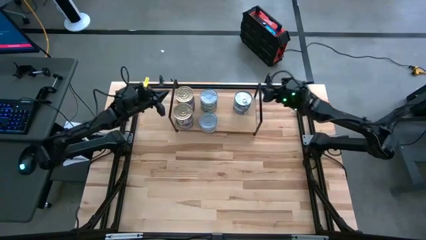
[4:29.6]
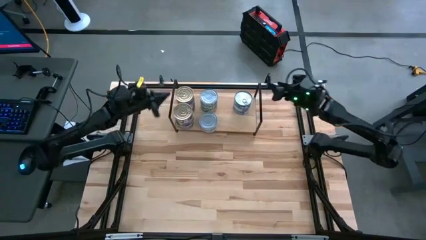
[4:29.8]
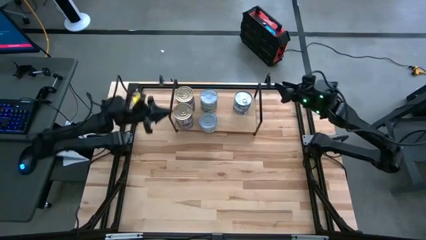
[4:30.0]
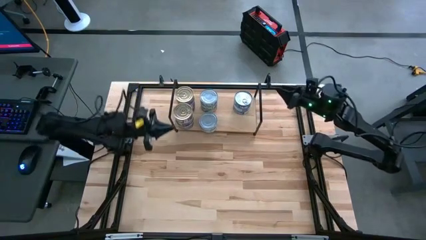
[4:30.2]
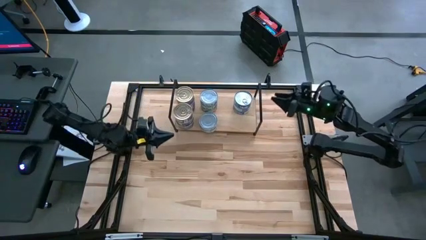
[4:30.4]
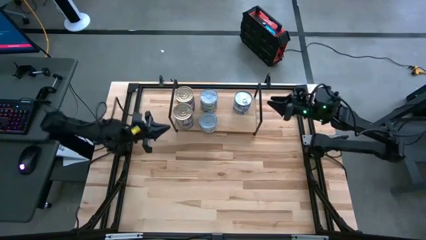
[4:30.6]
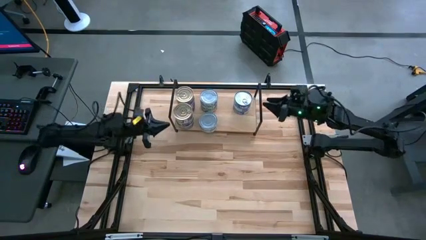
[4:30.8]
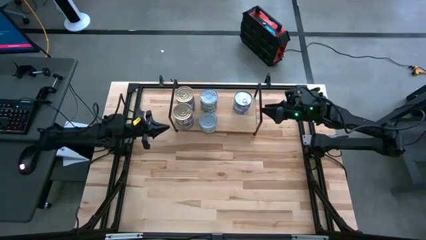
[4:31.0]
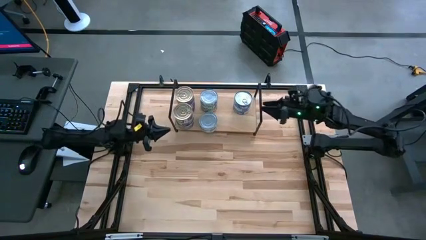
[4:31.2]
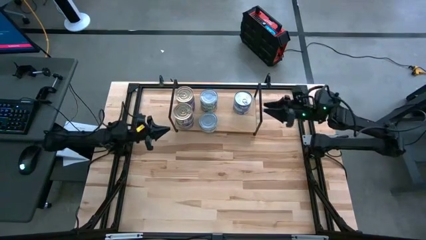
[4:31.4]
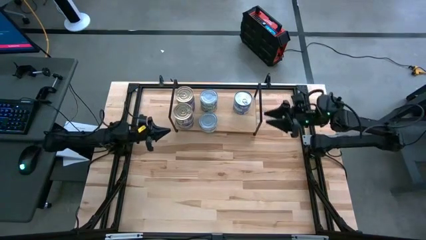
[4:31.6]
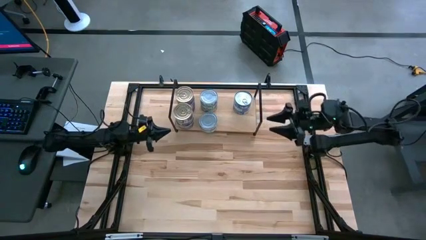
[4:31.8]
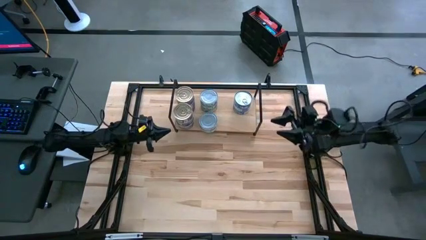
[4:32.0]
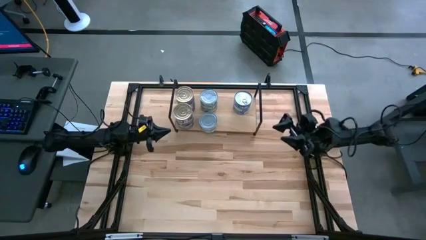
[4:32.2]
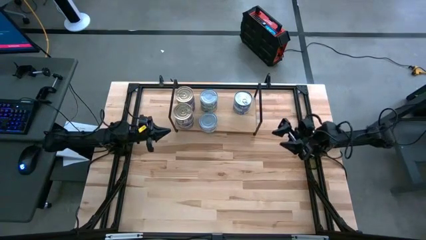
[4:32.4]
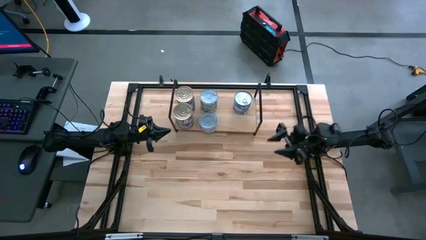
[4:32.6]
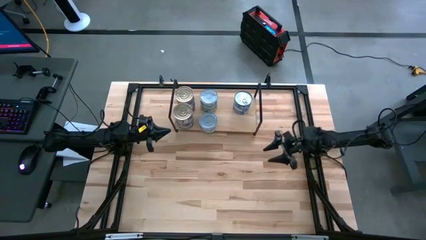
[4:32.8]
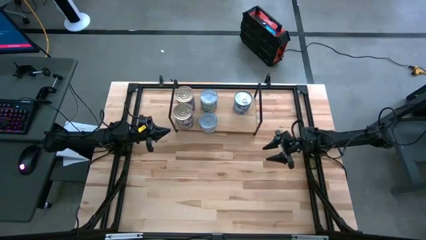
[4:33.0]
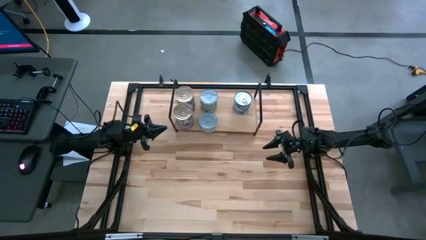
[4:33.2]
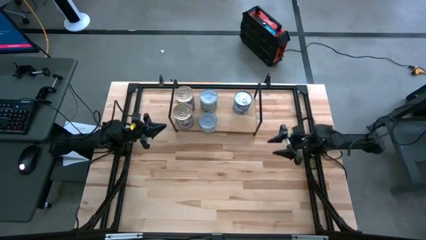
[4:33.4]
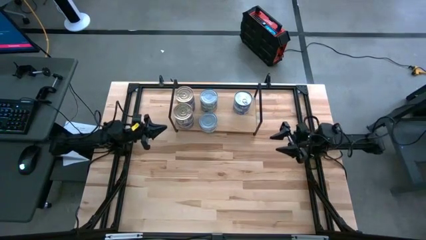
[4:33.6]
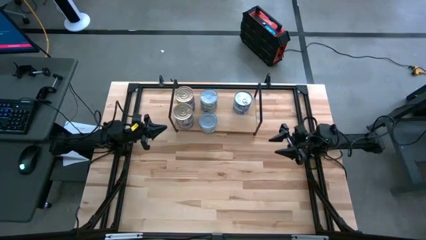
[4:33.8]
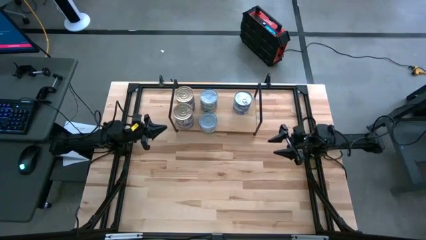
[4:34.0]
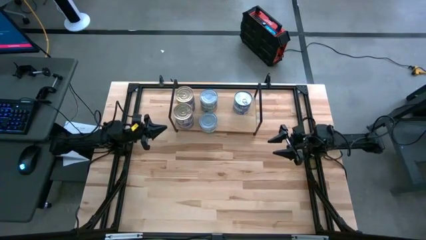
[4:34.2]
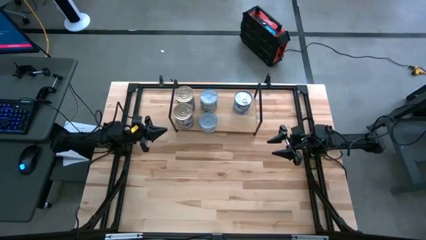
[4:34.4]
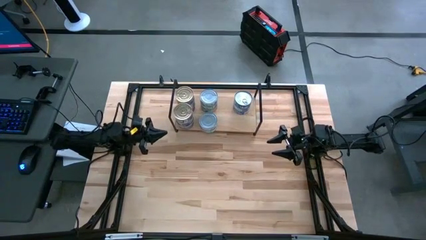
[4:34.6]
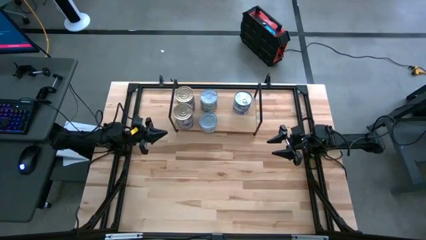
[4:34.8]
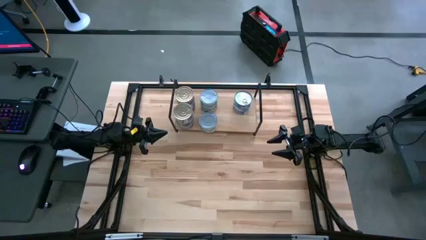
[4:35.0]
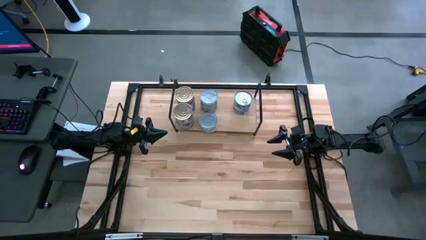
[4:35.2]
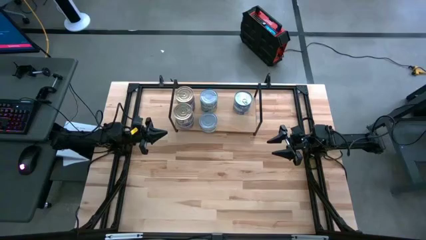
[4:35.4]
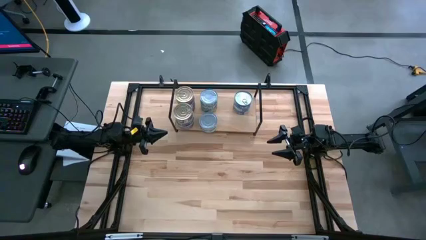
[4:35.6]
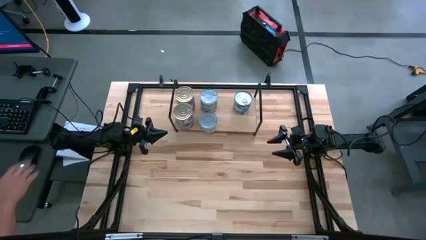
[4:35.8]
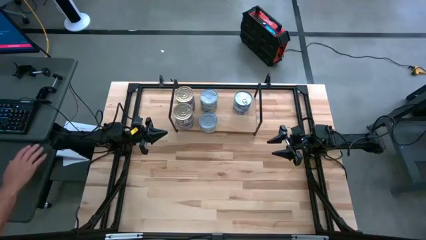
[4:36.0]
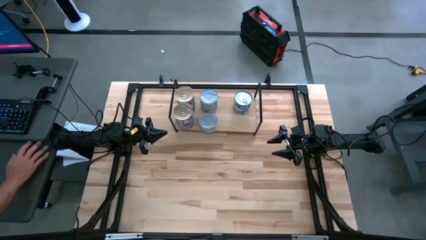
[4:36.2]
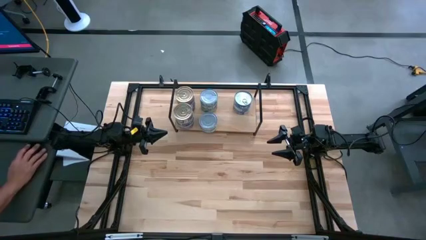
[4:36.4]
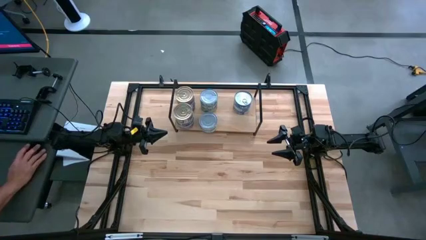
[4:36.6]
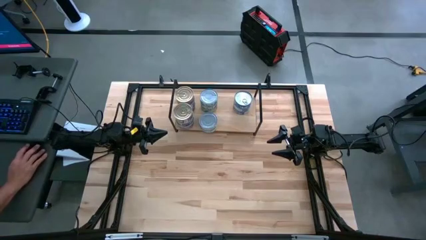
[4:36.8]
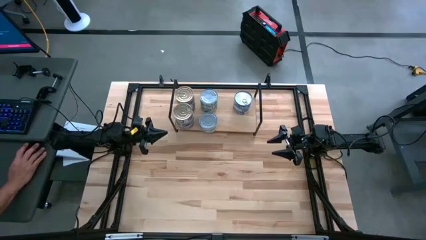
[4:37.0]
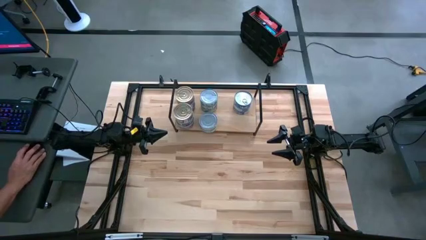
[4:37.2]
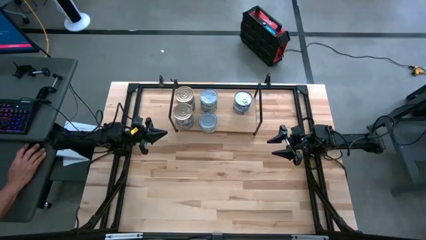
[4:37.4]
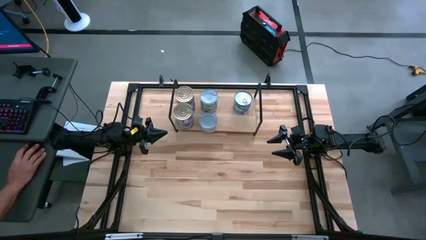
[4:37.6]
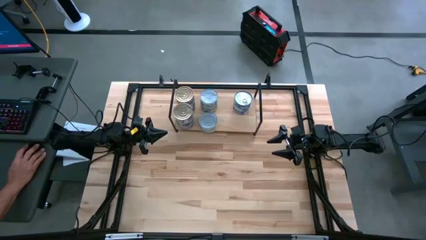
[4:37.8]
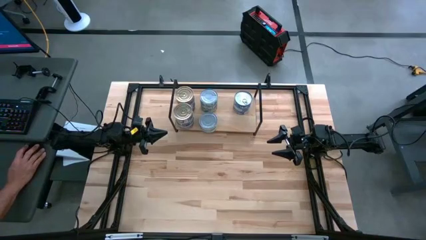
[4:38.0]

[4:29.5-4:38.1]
Task: Stack canned seafood by type on shelf
Return to Home Position

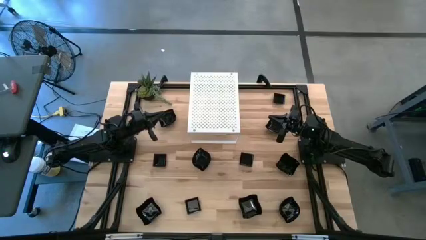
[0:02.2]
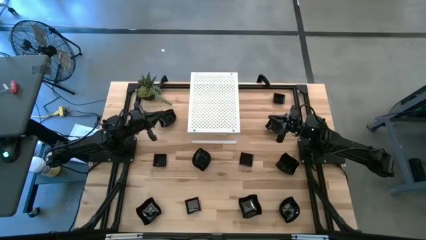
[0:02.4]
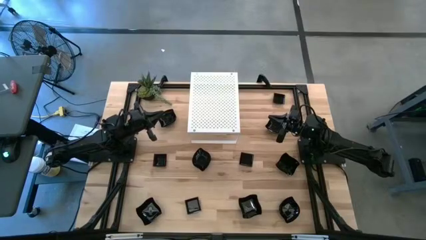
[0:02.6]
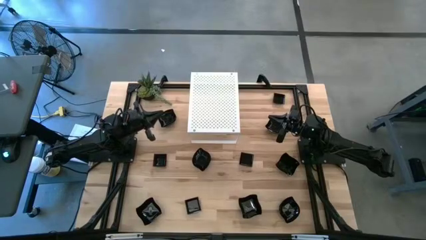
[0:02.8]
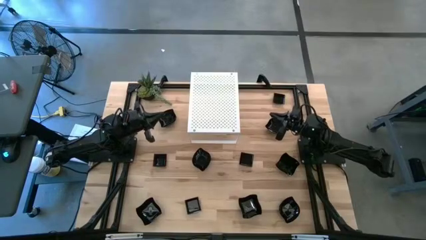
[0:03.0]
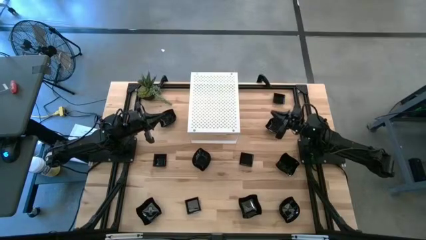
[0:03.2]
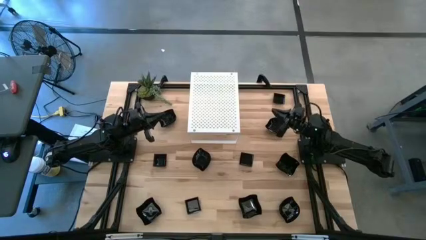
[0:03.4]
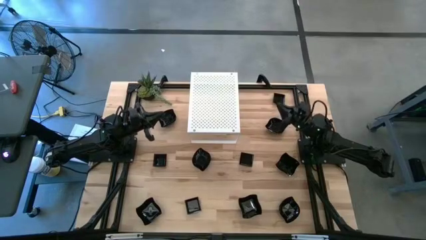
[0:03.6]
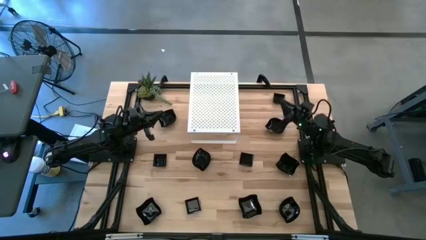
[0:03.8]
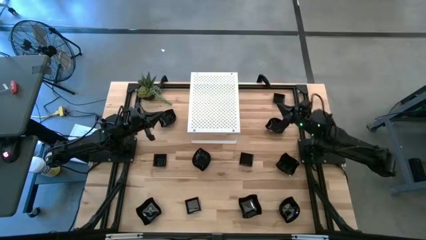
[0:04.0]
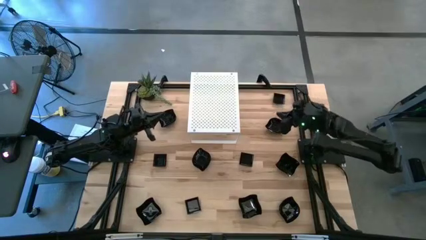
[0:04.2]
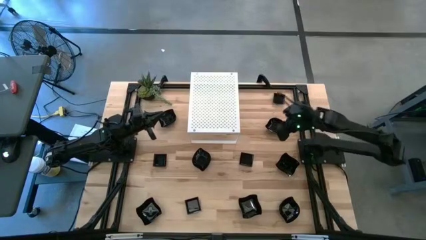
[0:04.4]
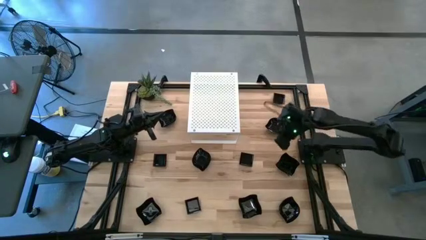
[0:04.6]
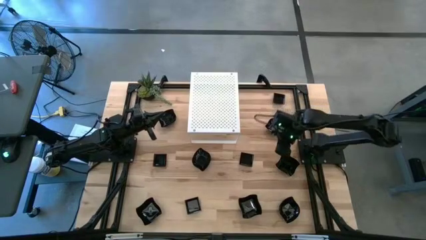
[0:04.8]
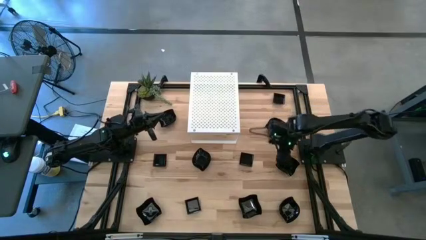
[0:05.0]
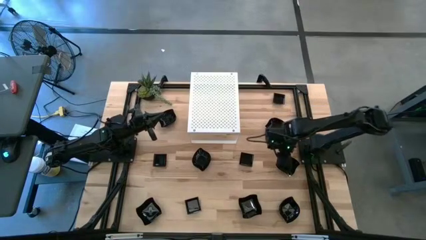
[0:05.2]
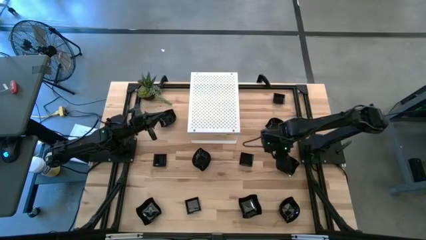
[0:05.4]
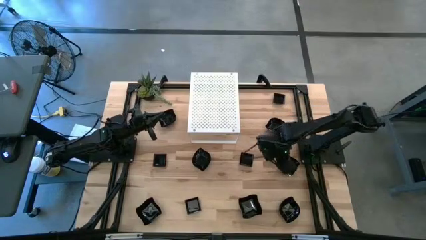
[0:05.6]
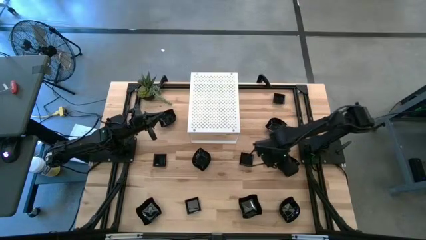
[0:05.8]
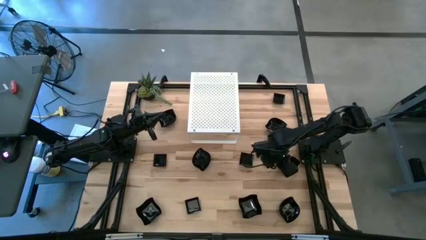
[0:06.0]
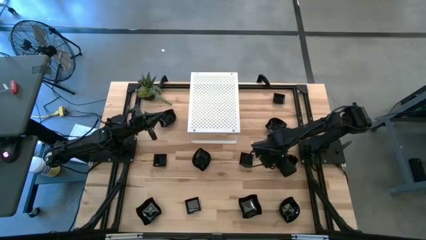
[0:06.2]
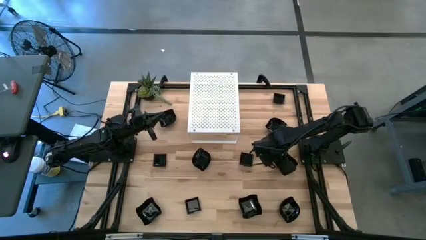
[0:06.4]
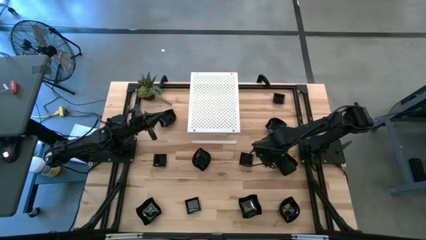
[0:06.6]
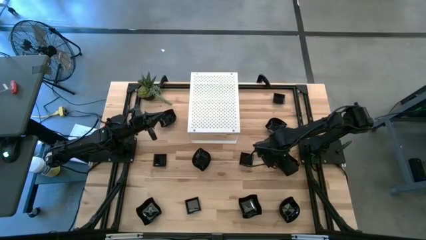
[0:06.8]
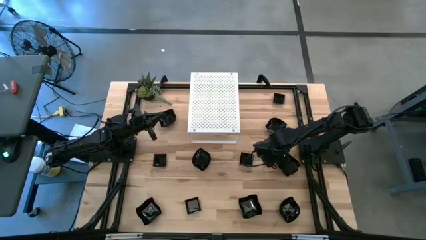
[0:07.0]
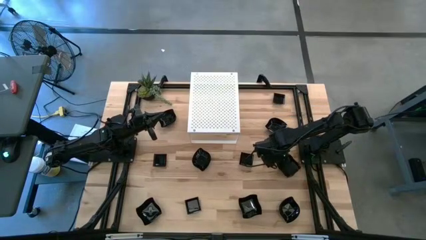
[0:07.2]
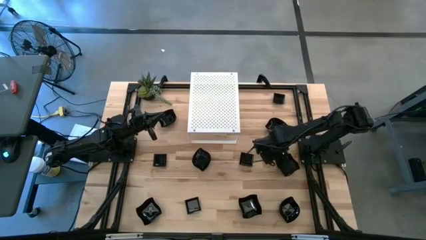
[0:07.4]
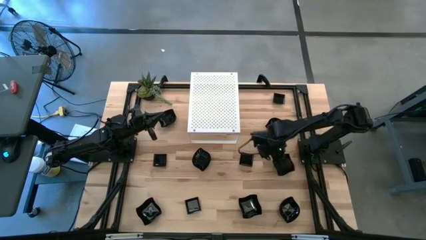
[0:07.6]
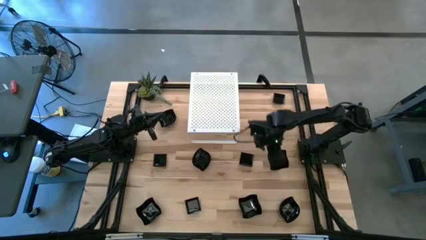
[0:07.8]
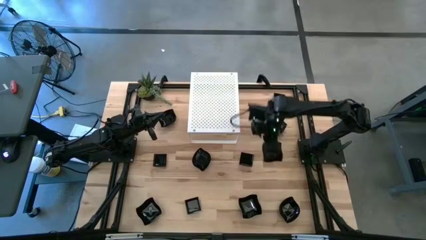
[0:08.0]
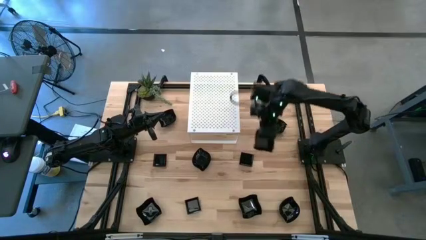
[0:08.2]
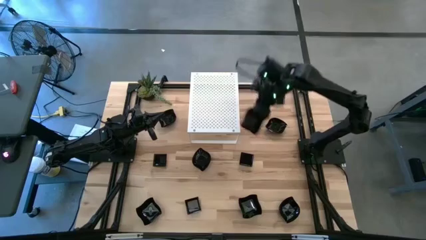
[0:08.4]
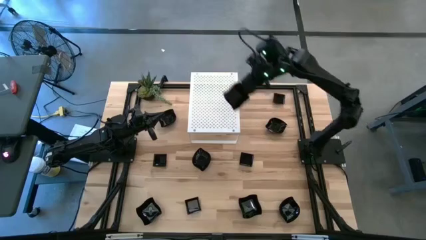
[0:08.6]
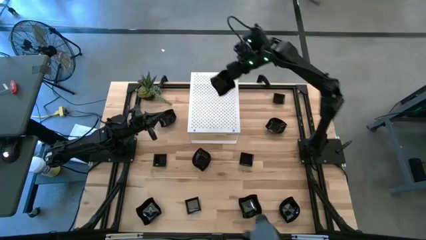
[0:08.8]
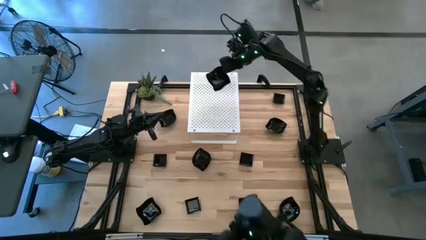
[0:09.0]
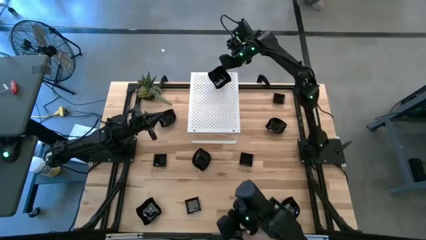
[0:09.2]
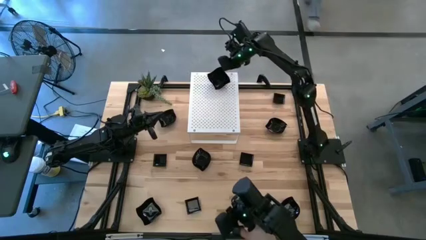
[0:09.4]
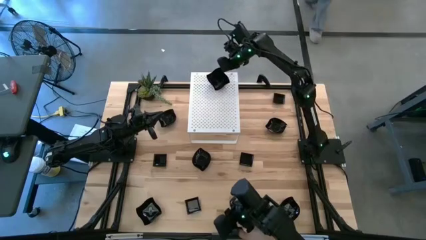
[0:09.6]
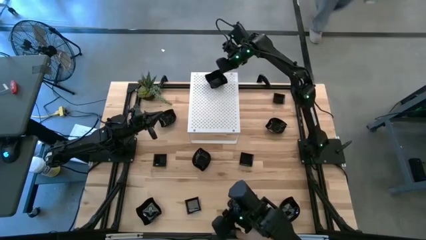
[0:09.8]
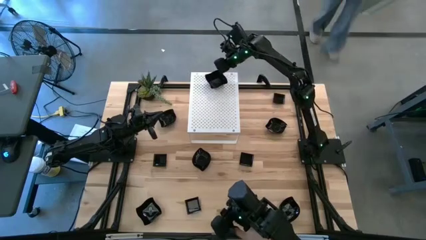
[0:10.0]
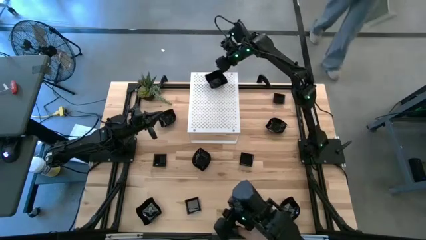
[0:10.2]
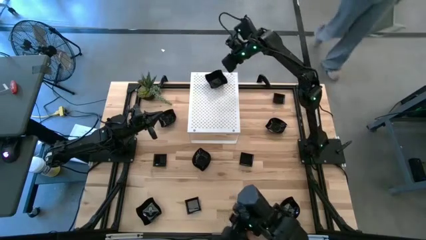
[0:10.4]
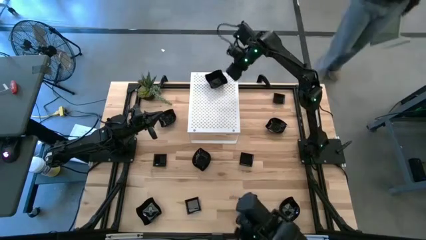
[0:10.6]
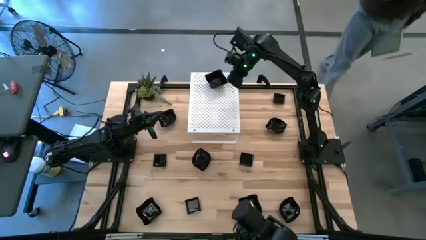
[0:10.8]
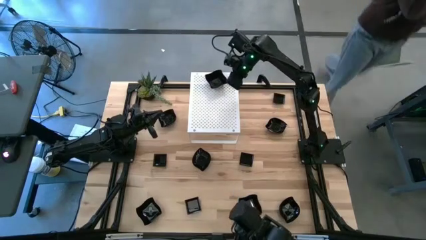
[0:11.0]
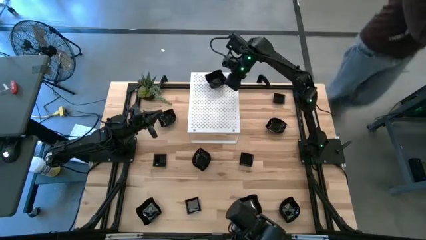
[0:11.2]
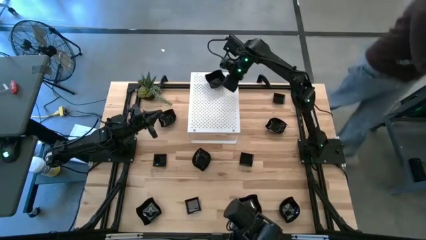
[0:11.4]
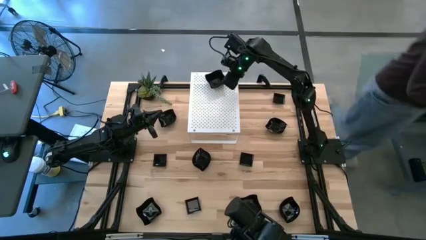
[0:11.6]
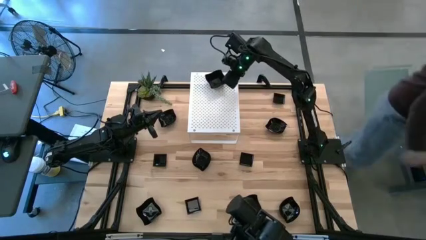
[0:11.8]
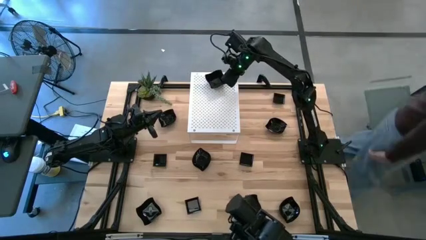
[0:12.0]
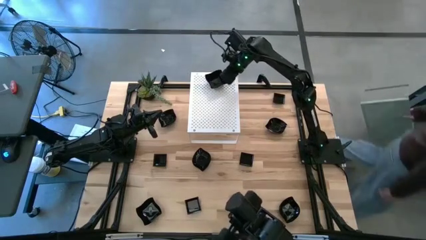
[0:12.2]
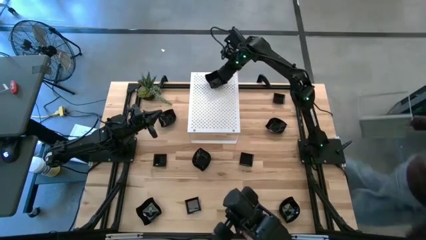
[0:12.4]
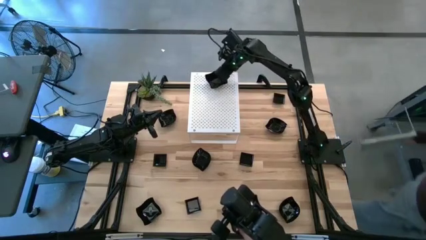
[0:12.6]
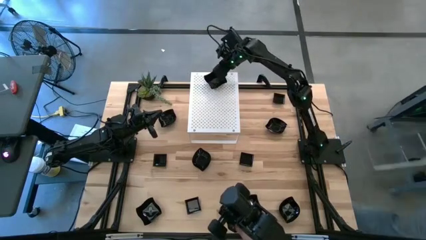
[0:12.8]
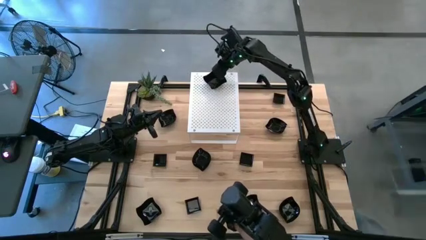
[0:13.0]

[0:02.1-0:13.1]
Task: Pick & Place Mini shaped plates
Put the black distorted square plate on the shelf
